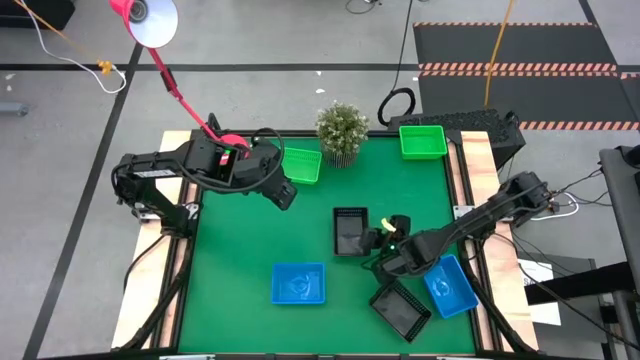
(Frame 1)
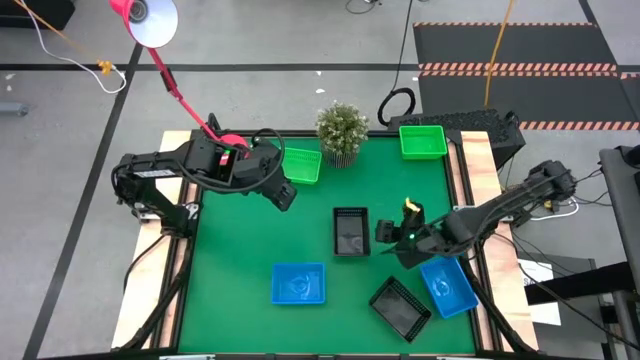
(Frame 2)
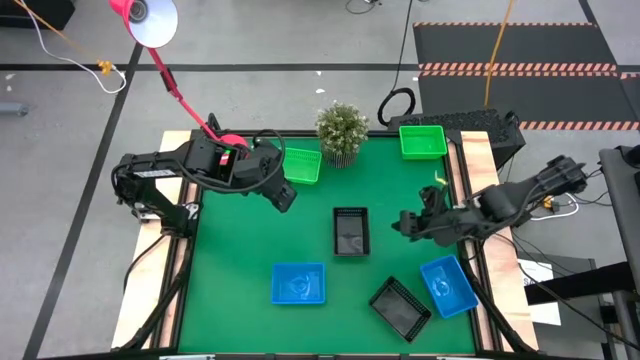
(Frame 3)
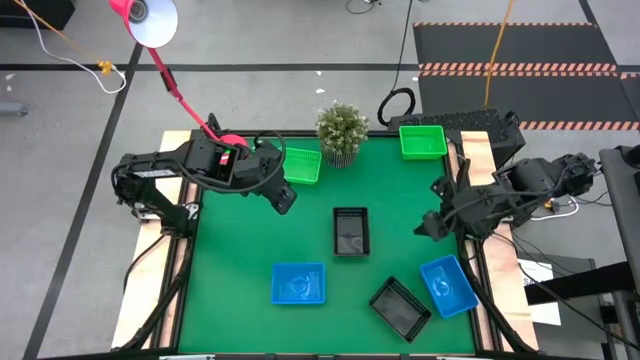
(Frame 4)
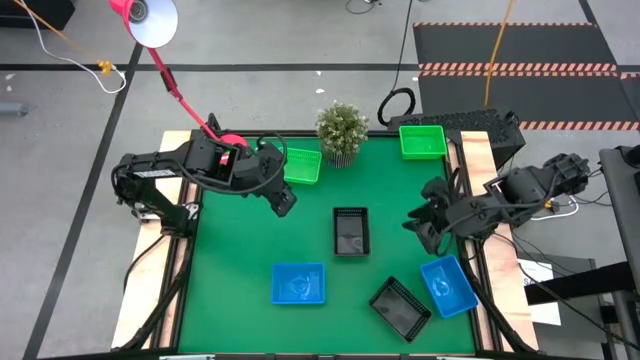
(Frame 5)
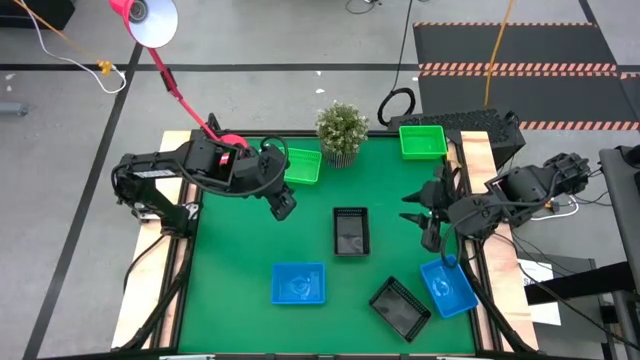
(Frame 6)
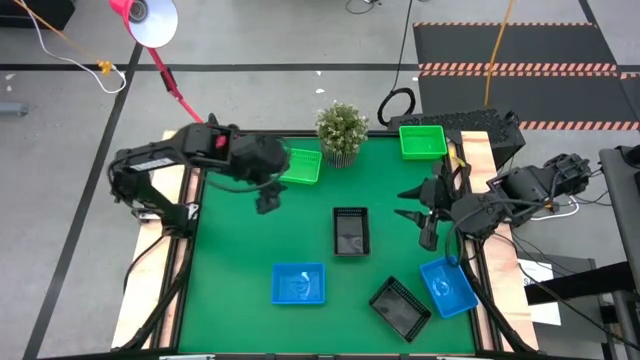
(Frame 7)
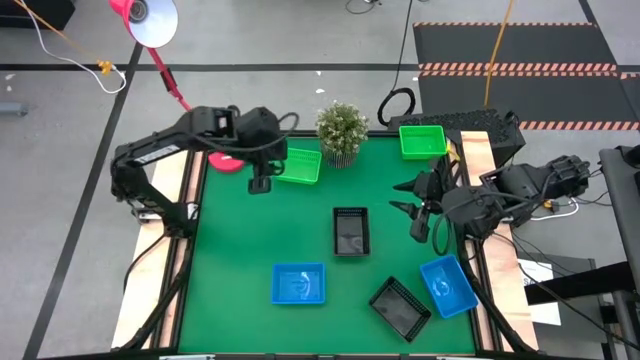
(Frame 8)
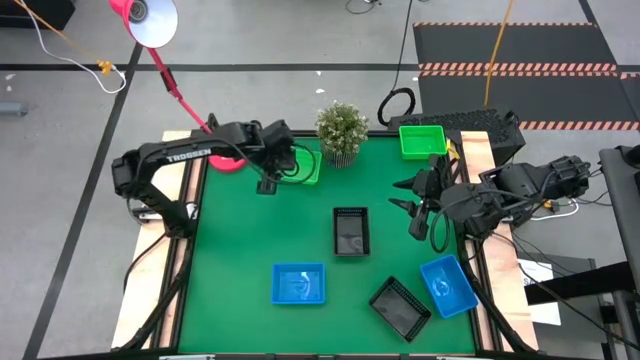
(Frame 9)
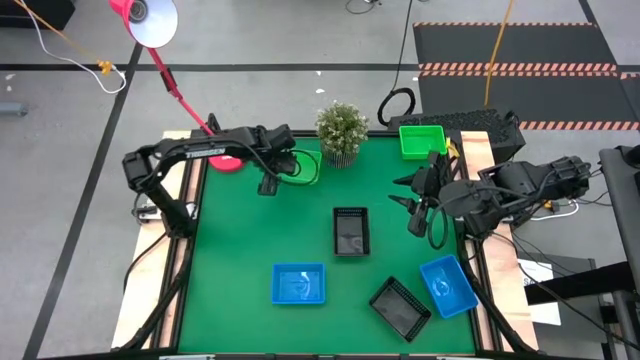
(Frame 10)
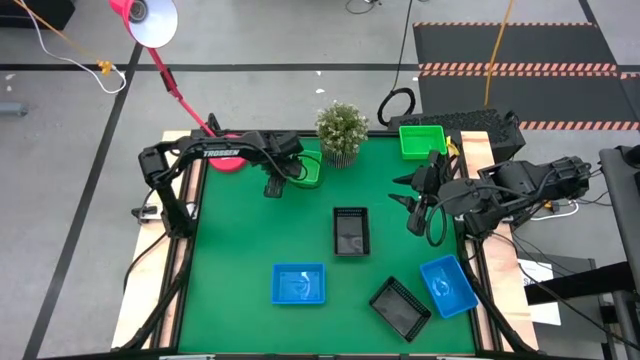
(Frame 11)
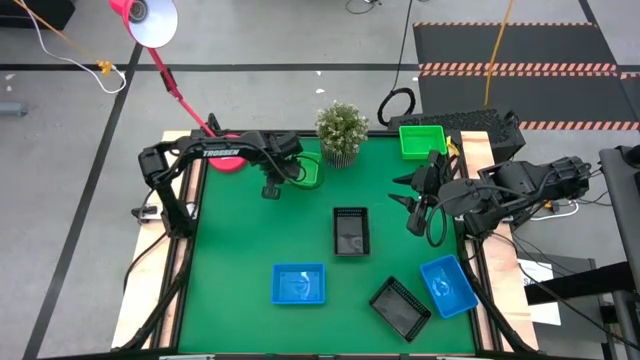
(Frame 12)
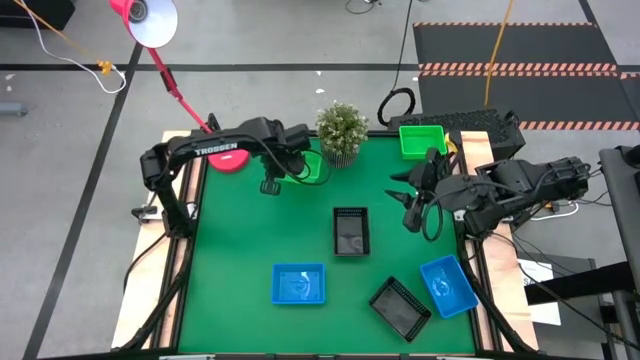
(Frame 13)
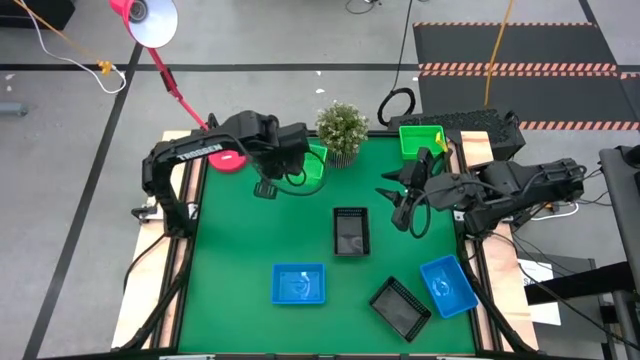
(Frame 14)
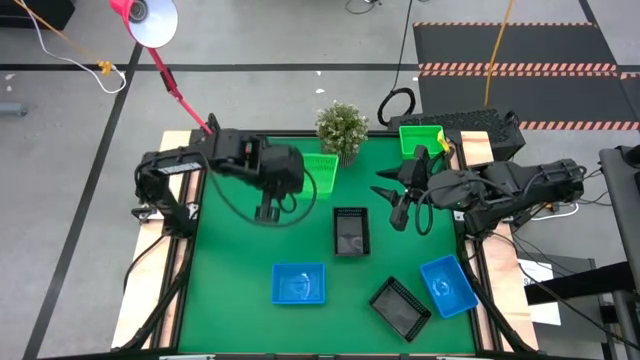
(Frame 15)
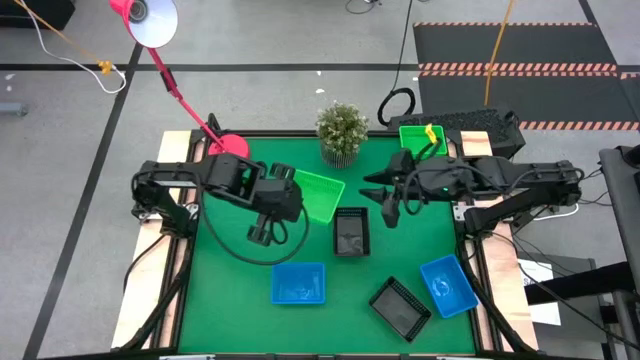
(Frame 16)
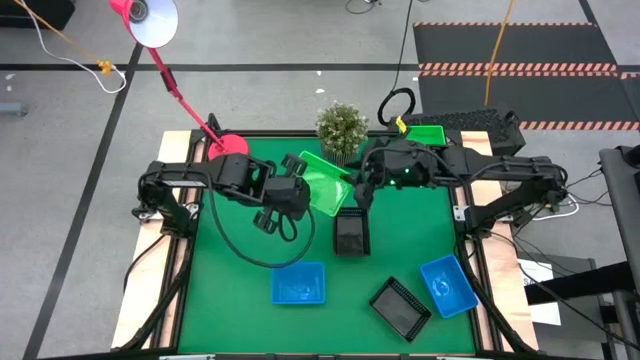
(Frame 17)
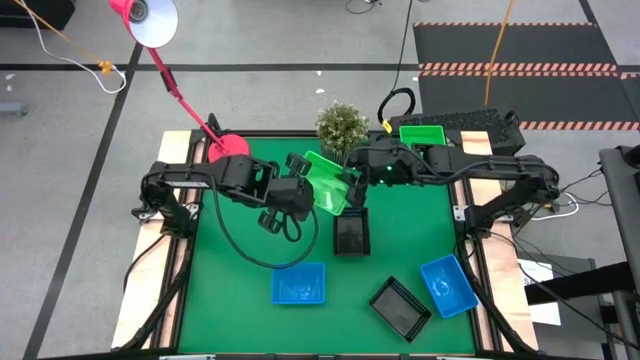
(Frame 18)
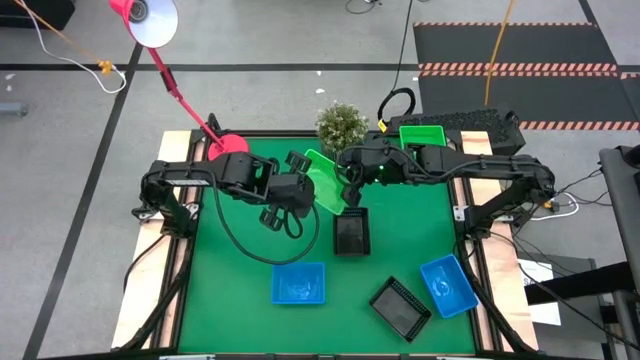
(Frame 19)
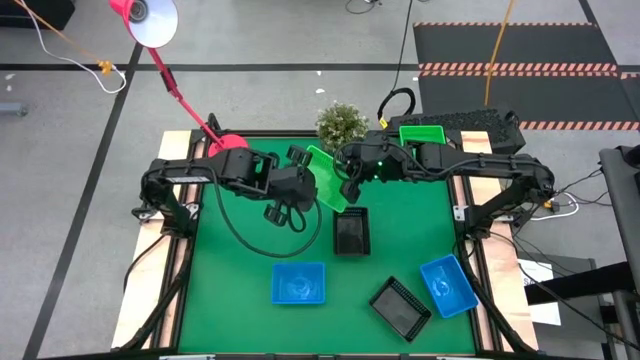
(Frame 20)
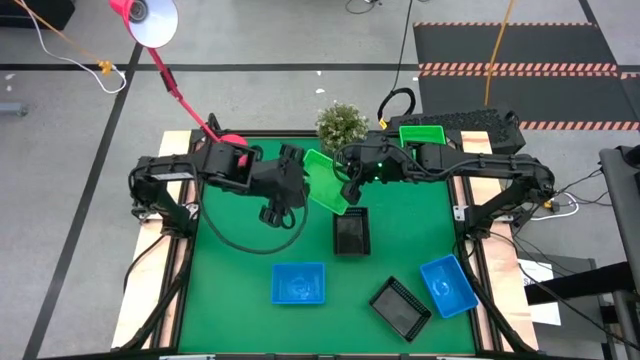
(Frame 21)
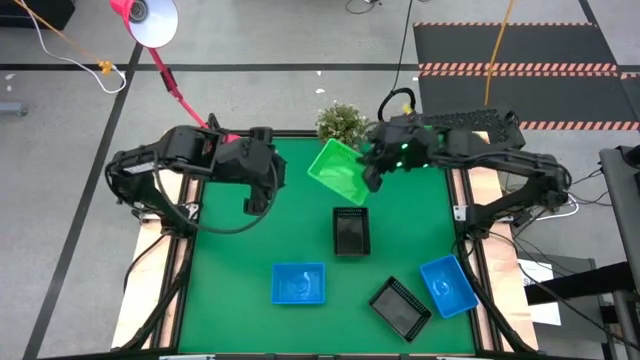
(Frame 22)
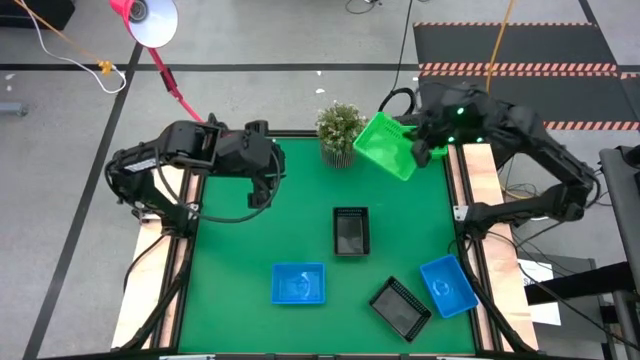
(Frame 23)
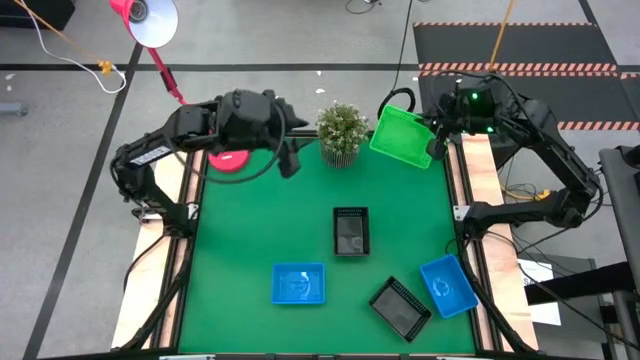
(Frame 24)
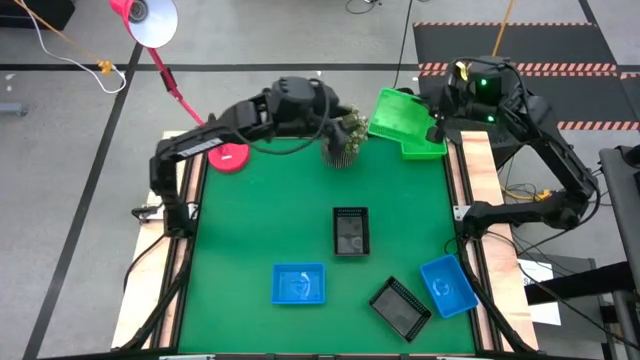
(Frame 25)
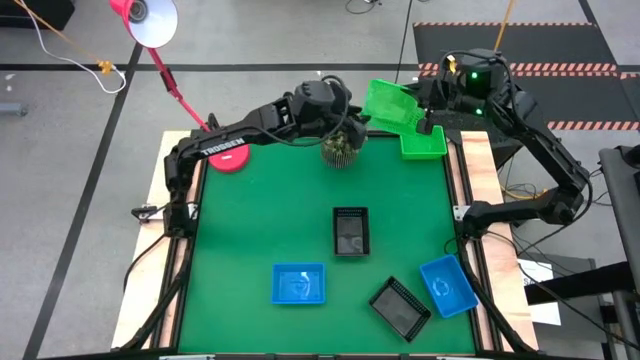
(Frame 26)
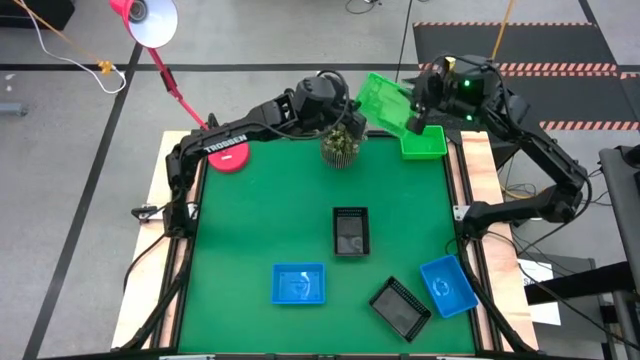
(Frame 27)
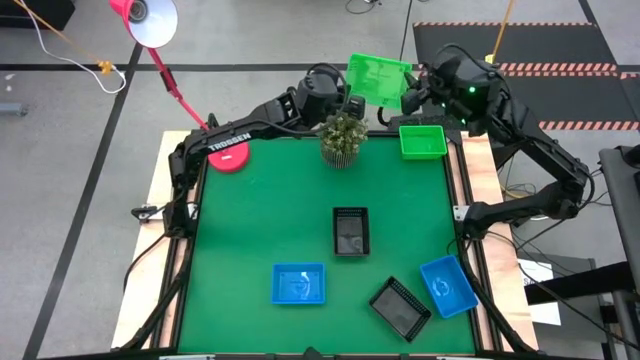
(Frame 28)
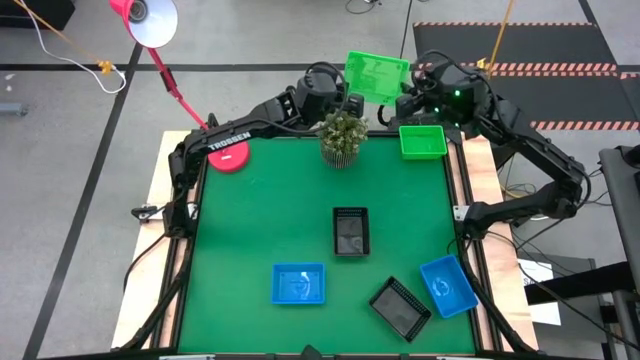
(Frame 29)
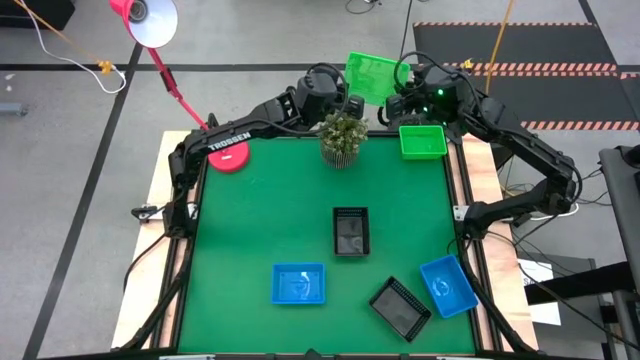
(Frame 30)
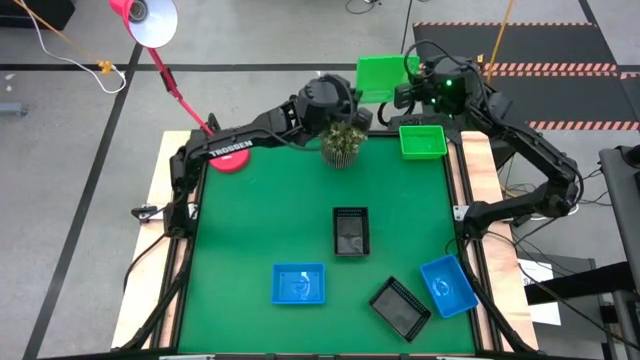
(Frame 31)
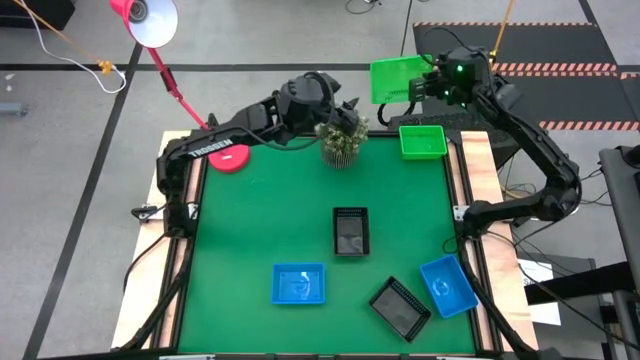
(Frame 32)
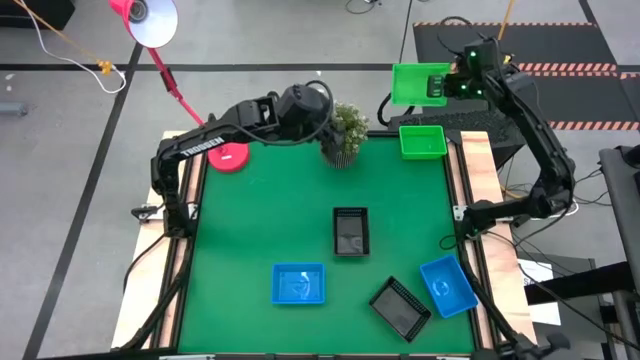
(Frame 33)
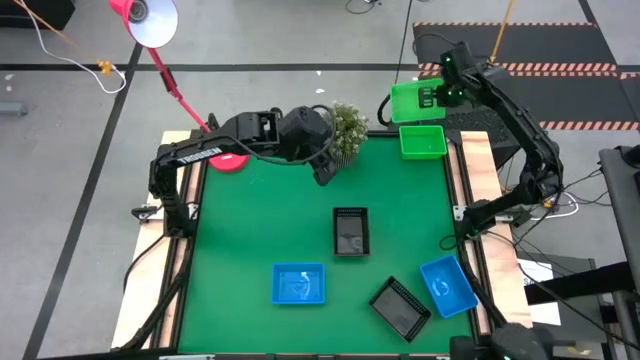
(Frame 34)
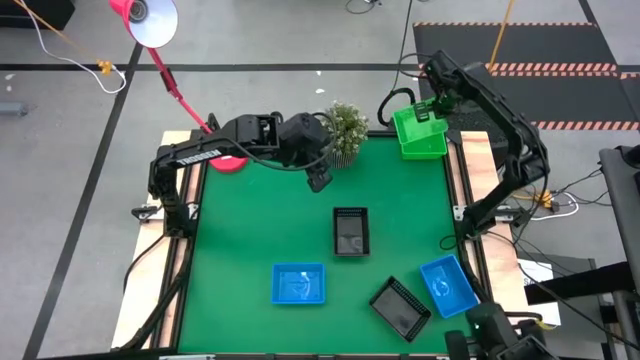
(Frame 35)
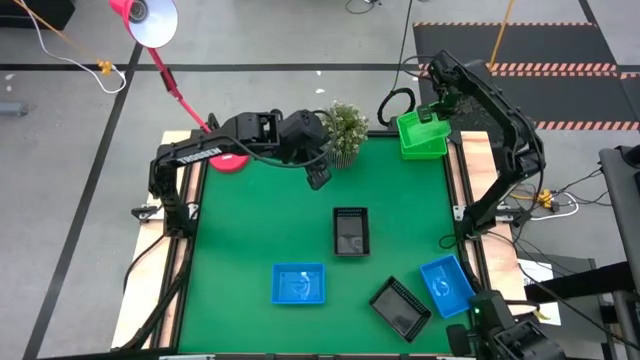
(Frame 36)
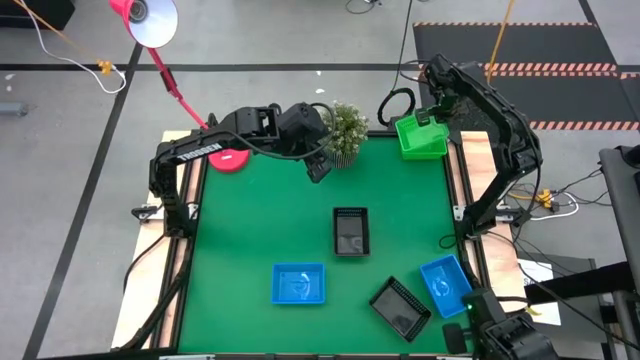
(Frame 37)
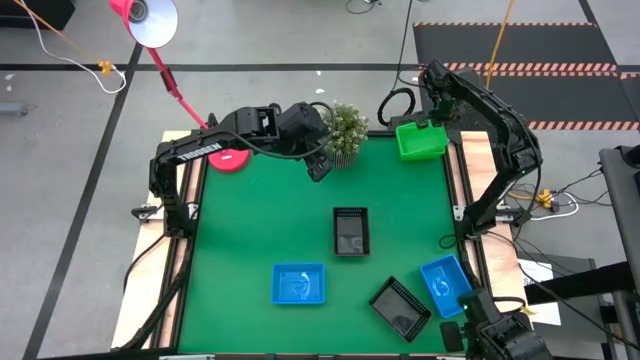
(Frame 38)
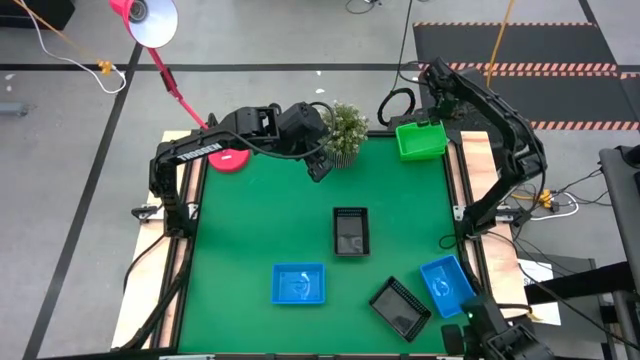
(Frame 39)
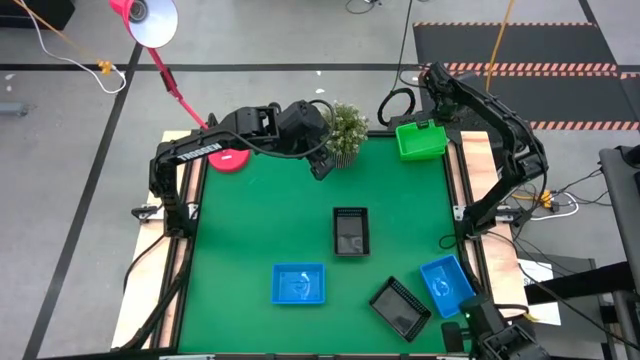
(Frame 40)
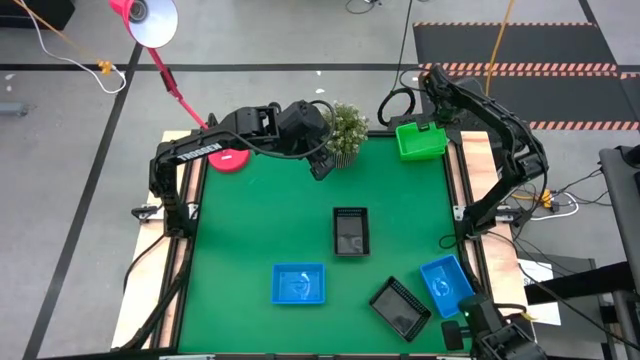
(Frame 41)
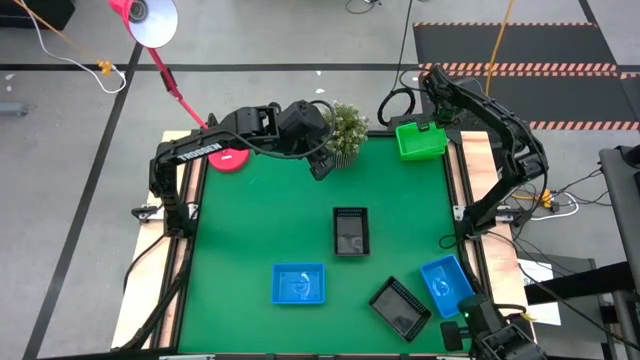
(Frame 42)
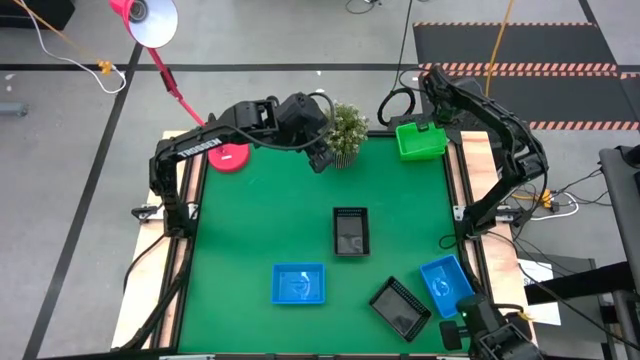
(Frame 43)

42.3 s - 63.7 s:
Stack the left green bin on the left stacked green bins
